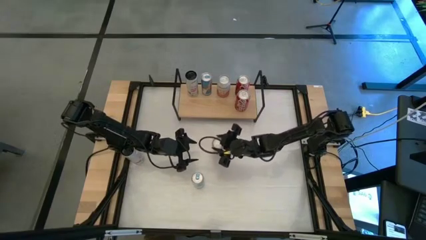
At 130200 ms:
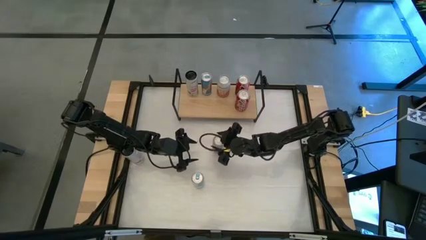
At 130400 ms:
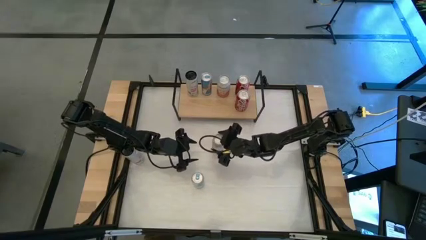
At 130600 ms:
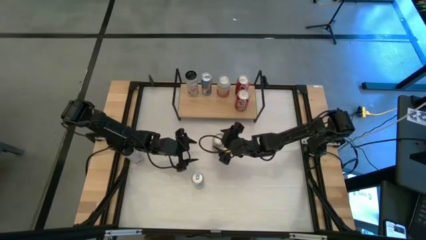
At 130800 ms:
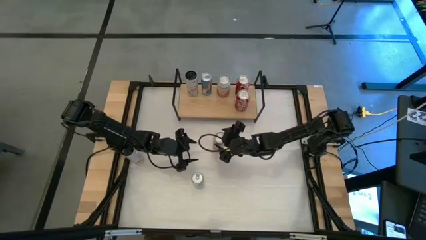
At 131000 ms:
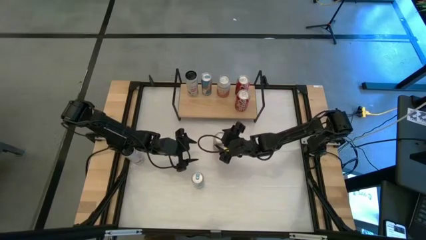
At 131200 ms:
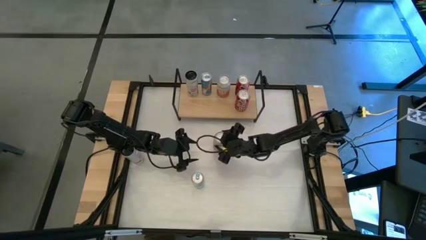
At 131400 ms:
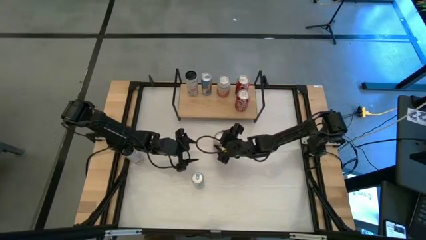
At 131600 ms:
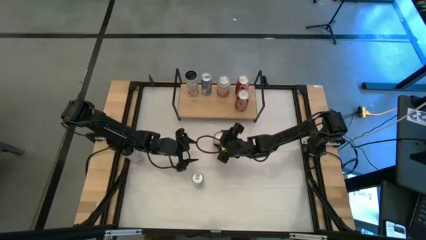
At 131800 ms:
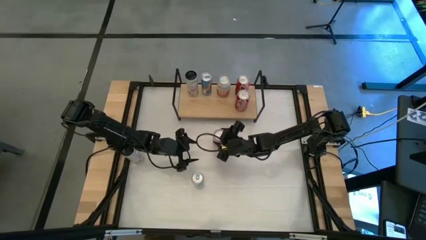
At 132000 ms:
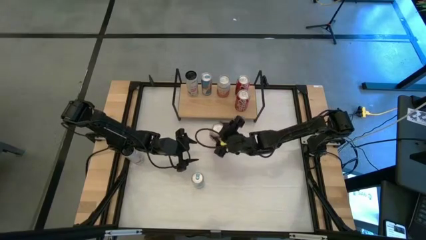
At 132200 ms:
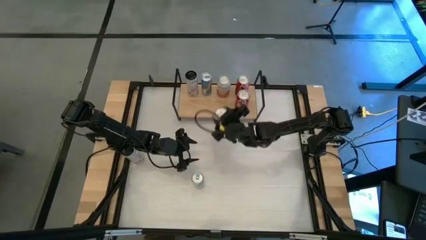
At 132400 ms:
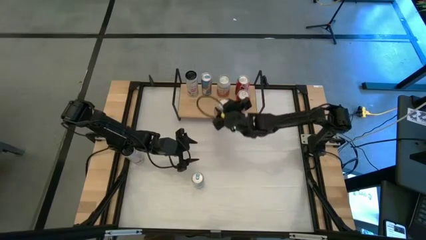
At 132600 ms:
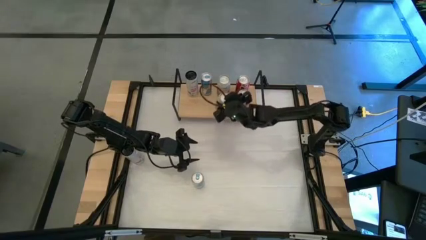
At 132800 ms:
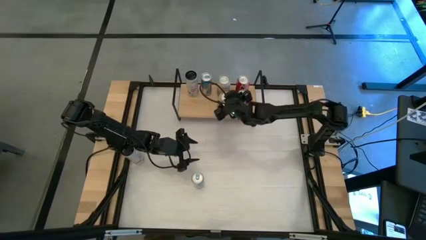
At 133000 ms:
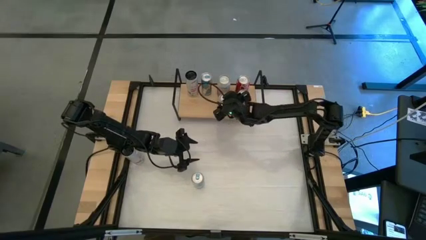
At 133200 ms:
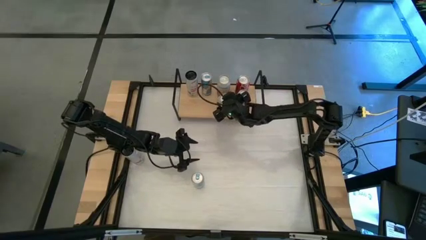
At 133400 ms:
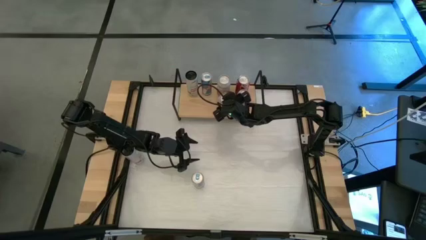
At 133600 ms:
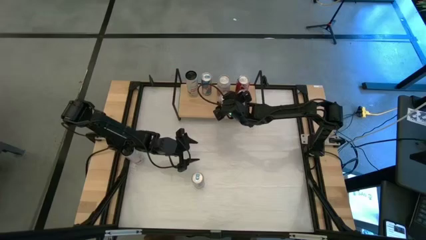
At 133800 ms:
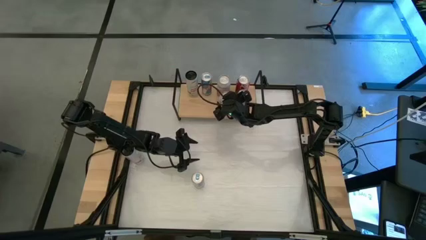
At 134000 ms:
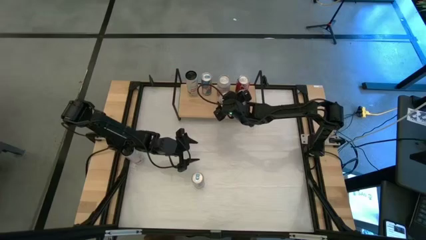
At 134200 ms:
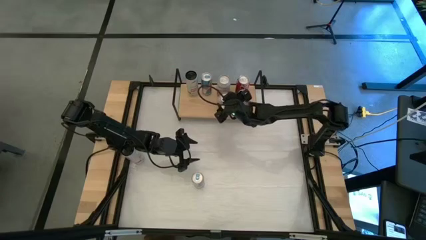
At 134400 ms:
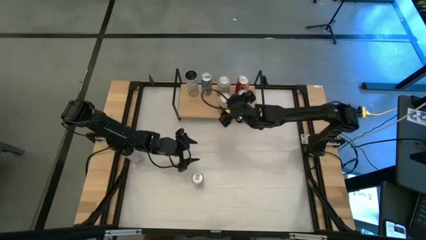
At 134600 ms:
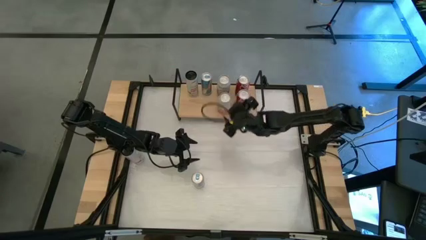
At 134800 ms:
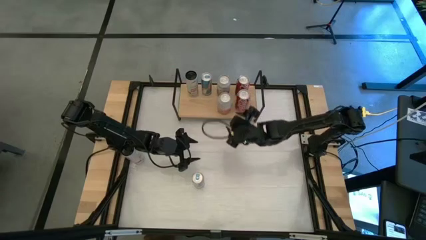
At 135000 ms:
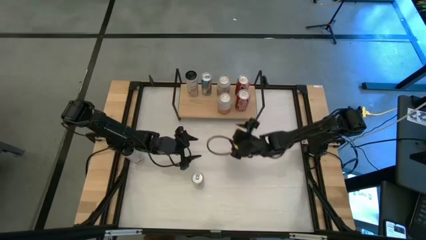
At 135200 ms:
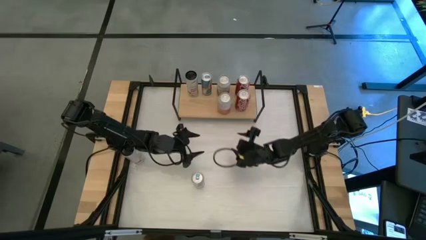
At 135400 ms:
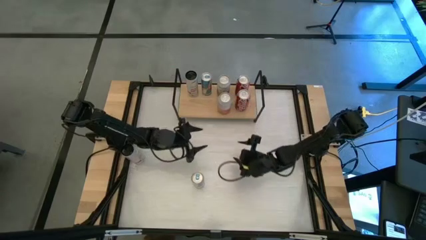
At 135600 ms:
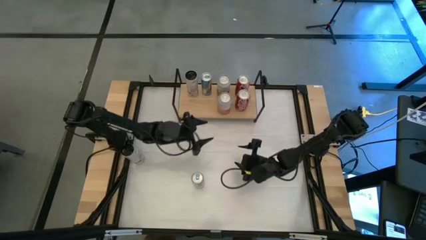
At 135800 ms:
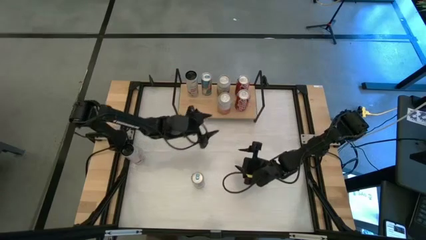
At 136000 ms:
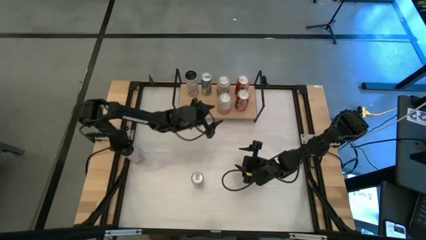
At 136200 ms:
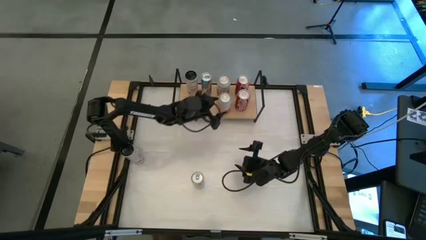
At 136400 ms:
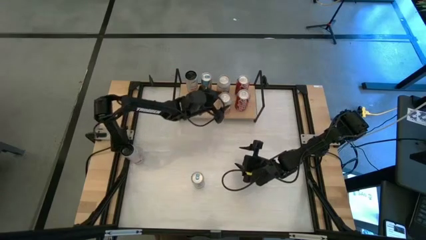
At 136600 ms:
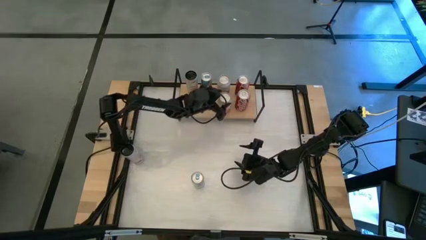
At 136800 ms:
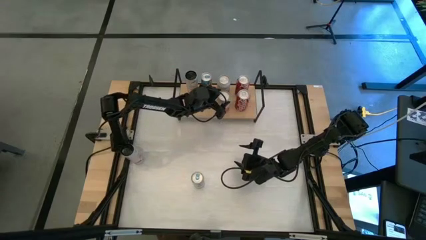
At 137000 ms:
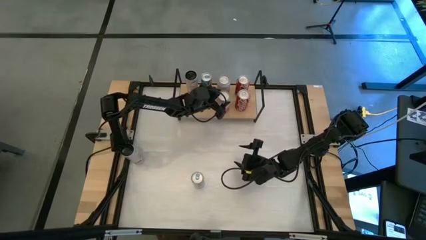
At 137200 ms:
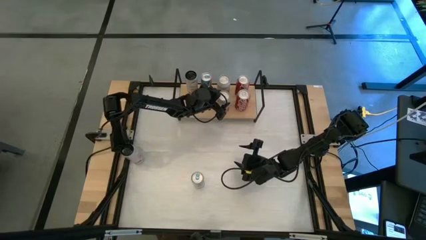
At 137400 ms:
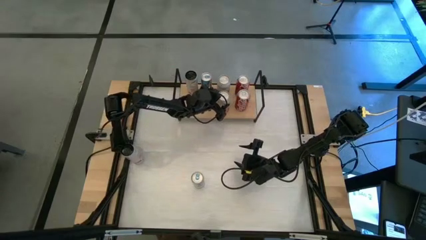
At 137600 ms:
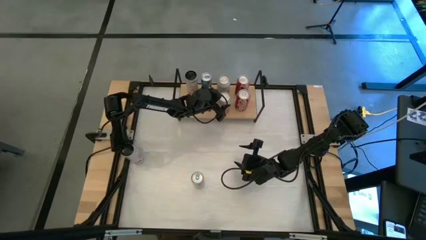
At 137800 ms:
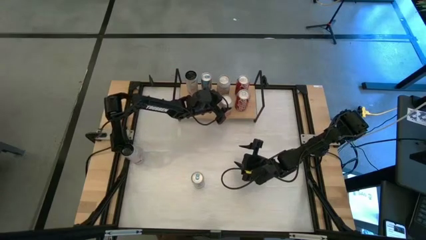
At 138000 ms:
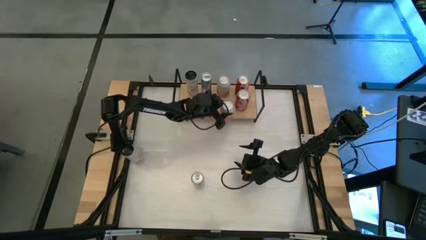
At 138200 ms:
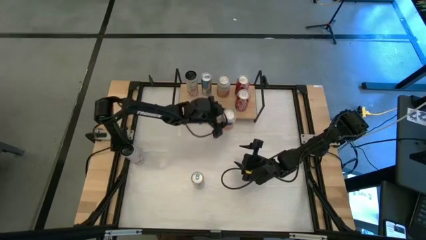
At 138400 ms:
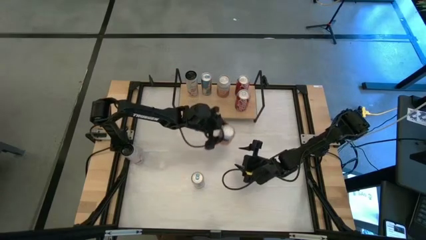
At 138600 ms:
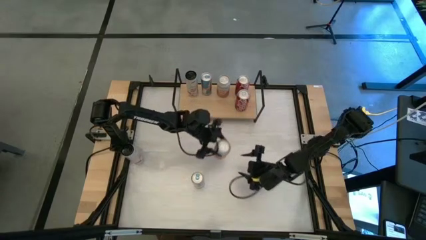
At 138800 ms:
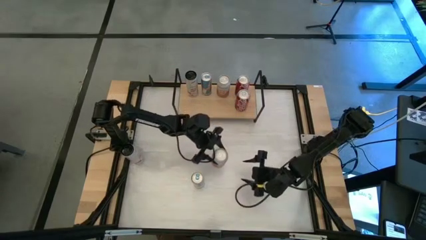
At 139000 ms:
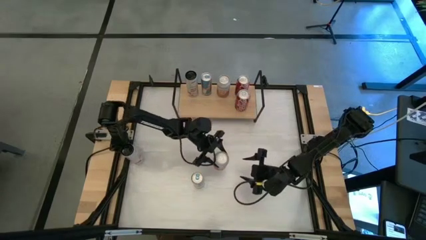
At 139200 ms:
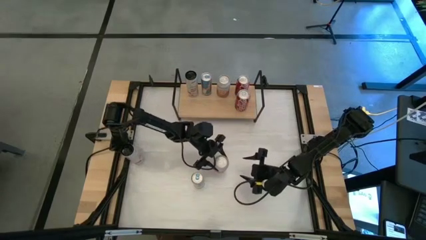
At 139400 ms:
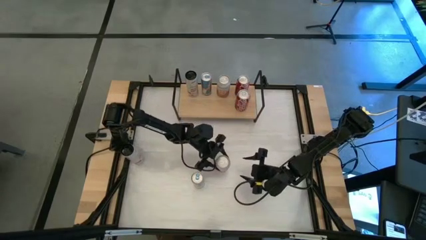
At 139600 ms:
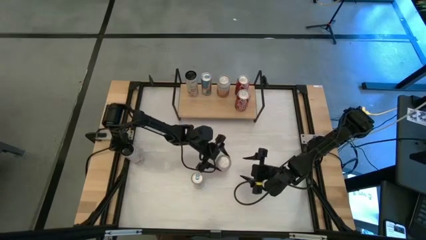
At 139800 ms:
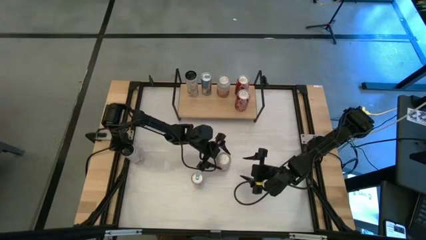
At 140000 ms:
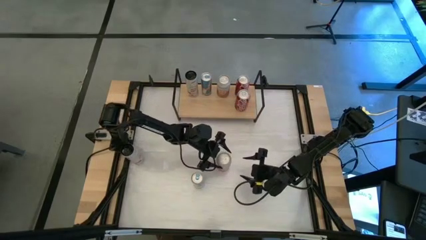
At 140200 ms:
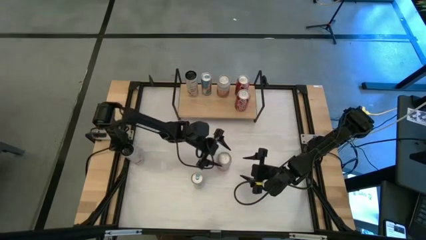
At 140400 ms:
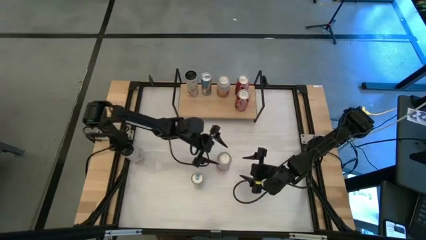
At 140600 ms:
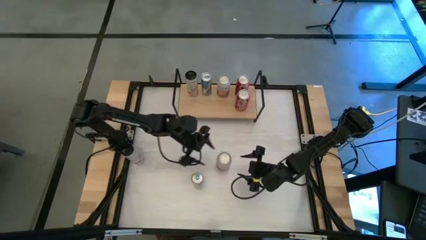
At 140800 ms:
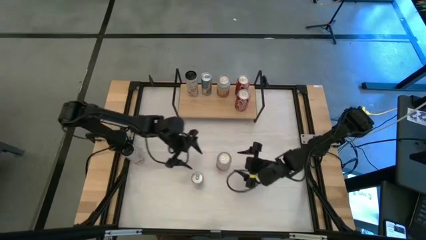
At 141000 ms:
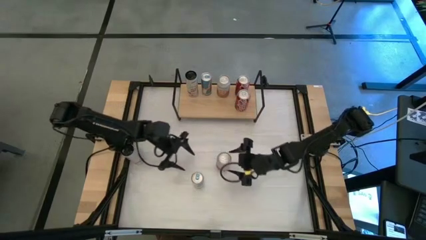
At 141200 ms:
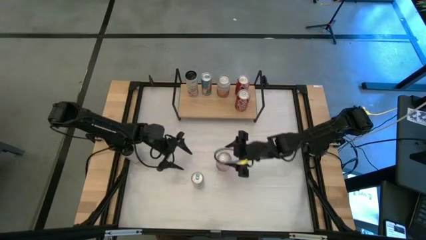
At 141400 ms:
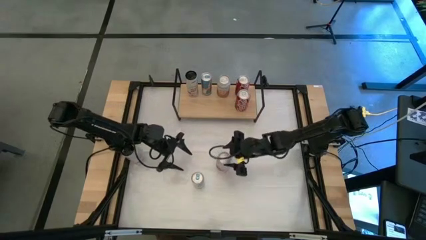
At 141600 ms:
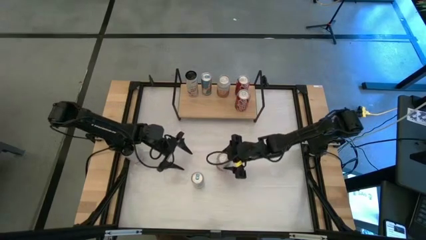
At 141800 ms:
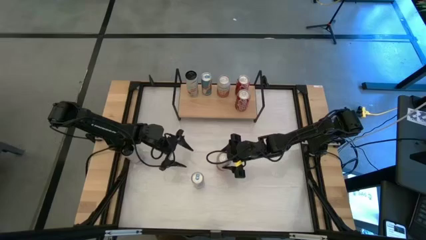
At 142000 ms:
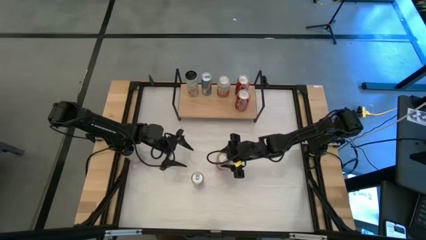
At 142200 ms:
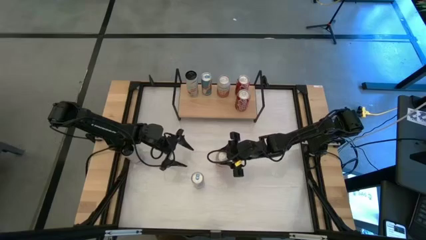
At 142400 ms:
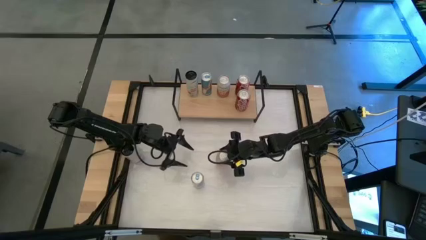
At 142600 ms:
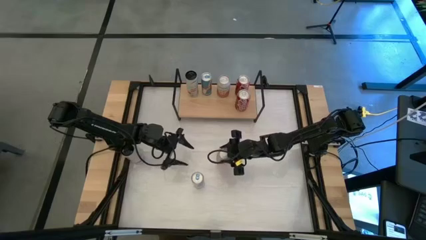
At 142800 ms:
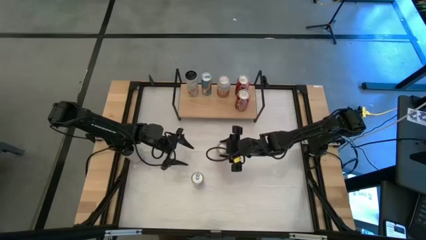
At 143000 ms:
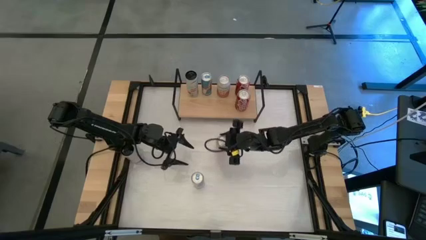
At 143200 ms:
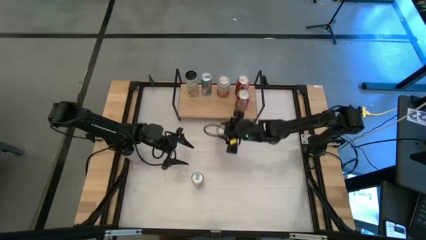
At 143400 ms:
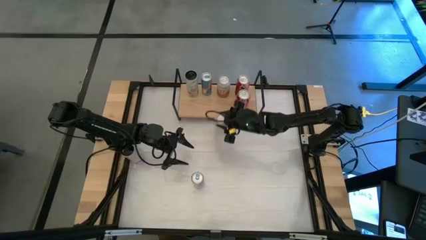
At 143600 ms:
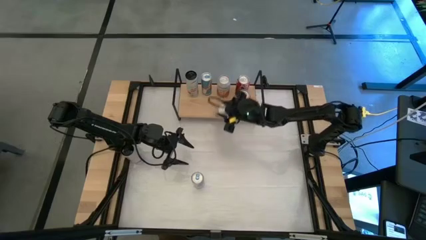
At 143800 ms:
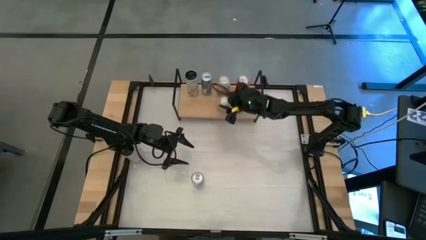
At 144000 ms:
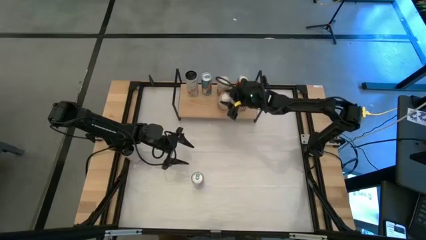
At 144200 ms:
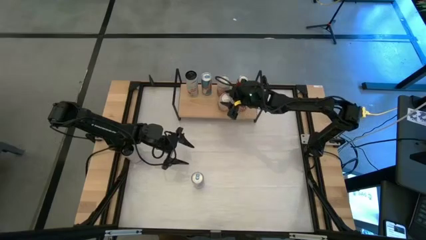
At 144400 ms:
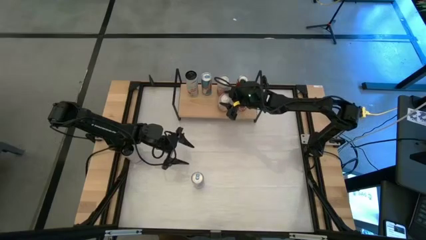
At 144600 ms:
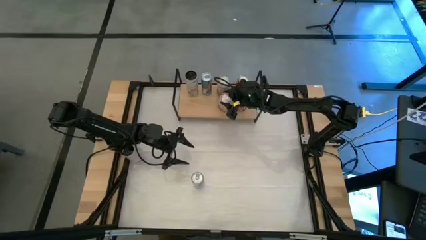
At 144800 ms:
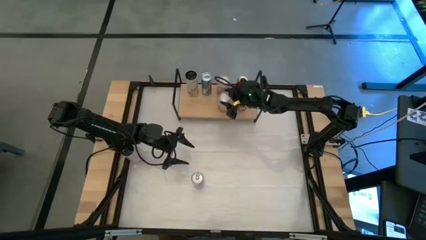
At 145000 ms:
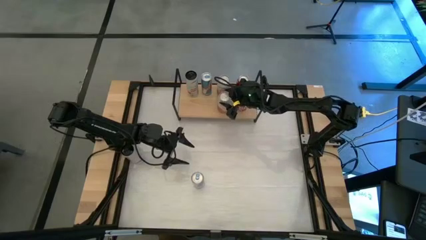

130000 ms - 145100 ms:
Task: Place canned beverage on shelf
Put the pink soda can align with the other pink soda can on the shelf
